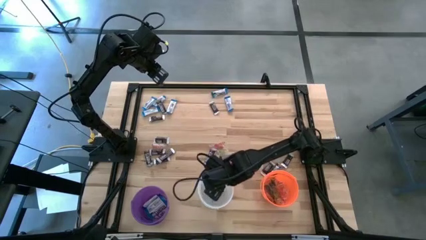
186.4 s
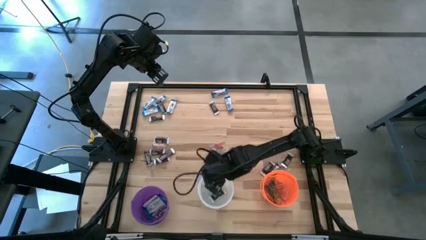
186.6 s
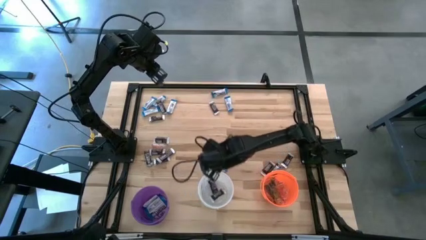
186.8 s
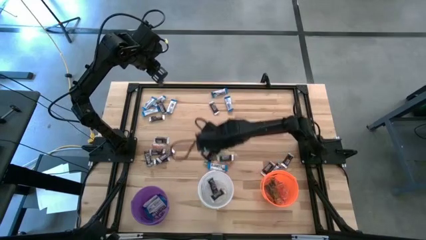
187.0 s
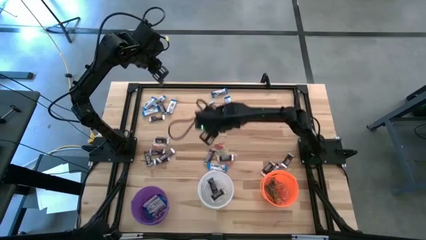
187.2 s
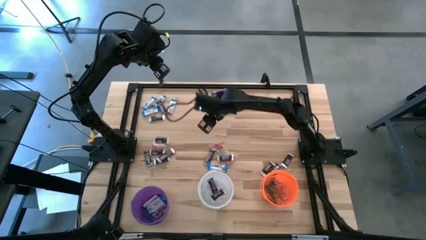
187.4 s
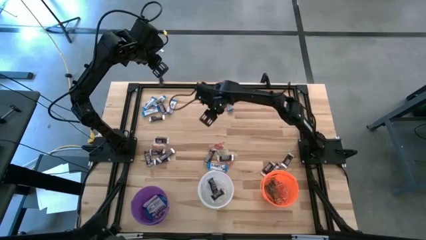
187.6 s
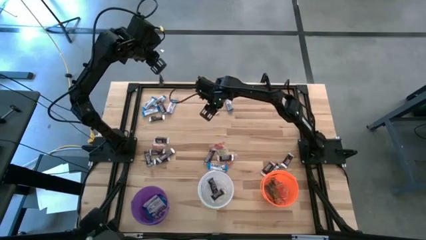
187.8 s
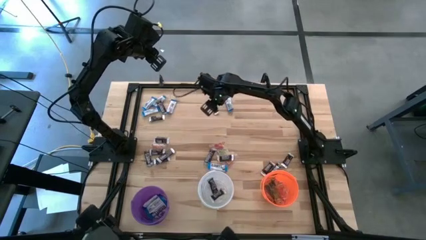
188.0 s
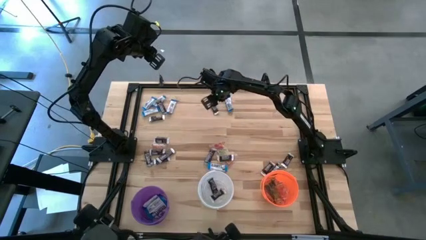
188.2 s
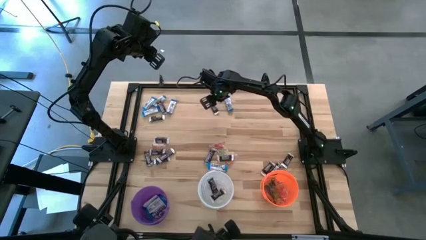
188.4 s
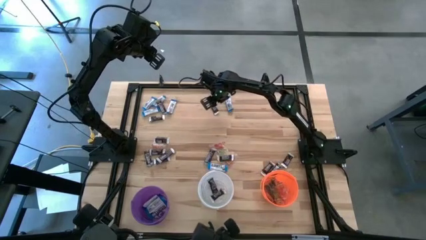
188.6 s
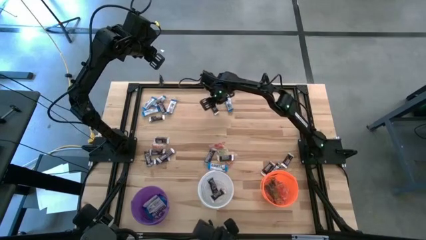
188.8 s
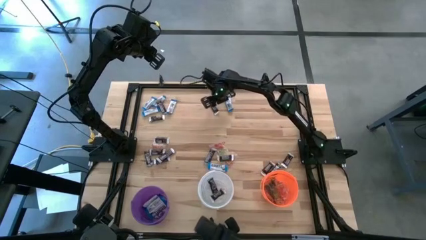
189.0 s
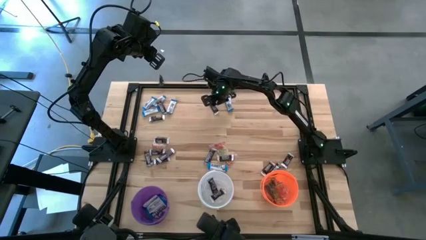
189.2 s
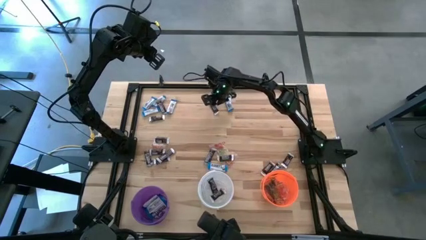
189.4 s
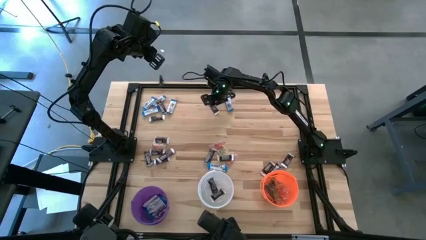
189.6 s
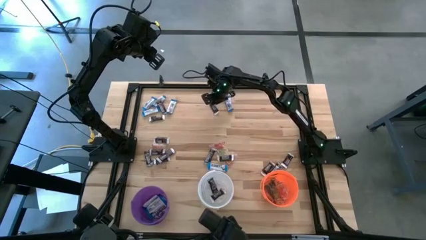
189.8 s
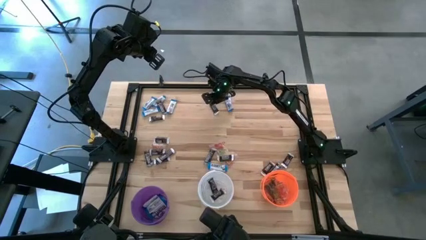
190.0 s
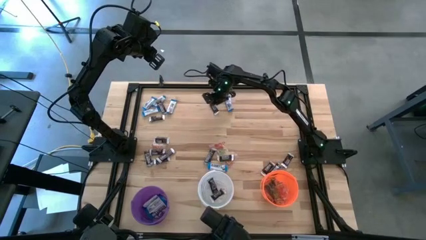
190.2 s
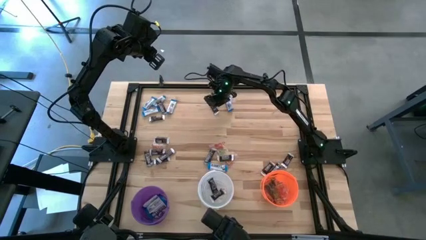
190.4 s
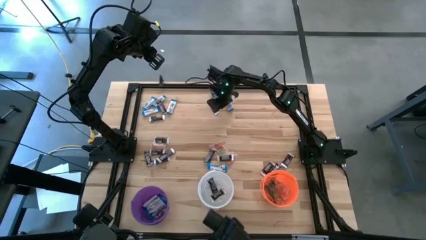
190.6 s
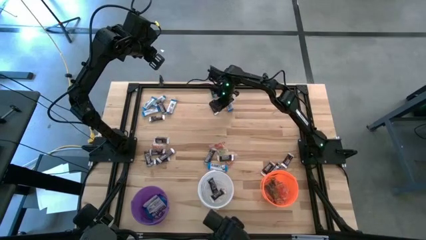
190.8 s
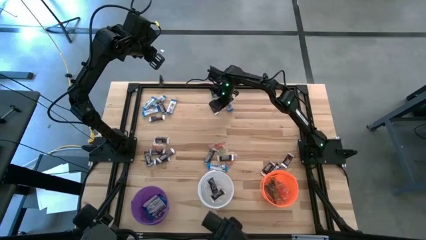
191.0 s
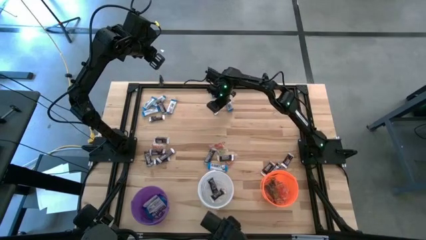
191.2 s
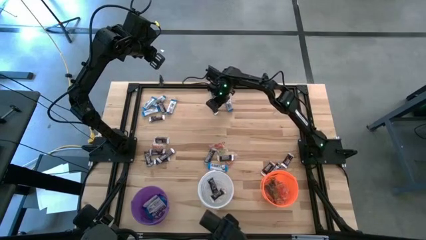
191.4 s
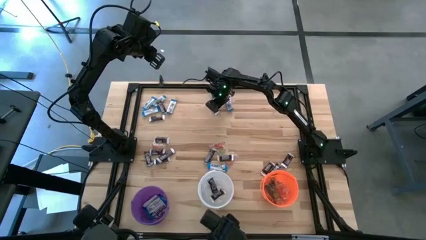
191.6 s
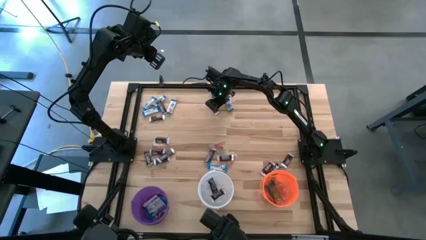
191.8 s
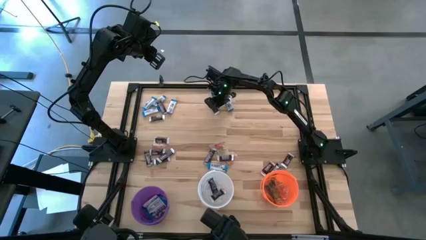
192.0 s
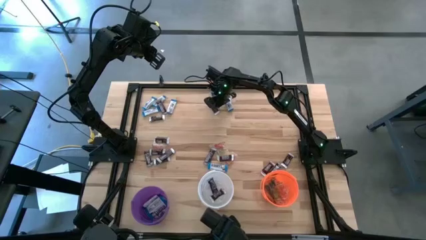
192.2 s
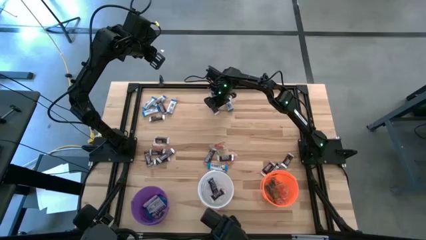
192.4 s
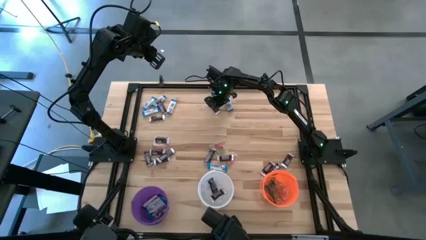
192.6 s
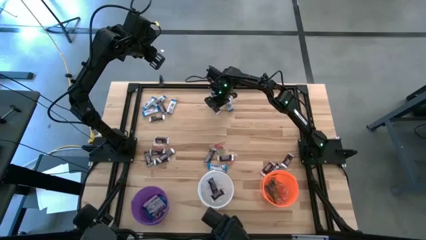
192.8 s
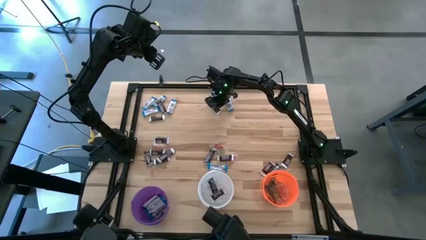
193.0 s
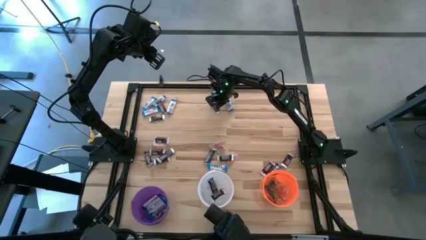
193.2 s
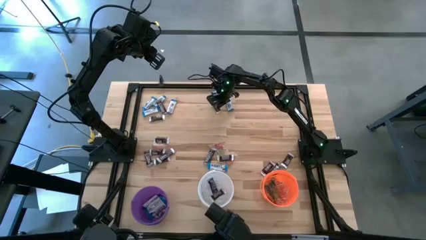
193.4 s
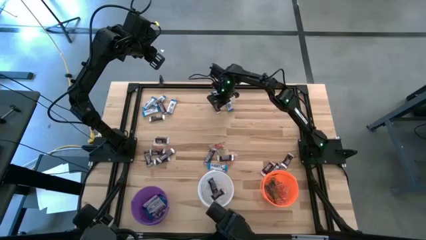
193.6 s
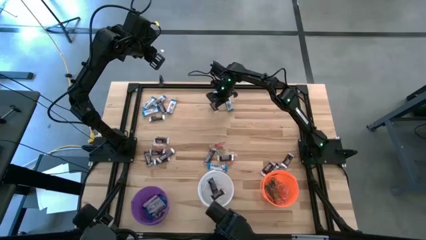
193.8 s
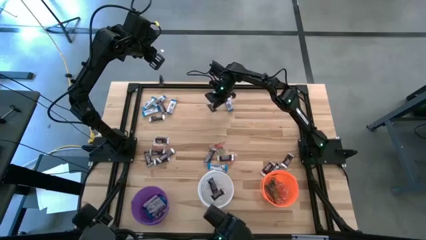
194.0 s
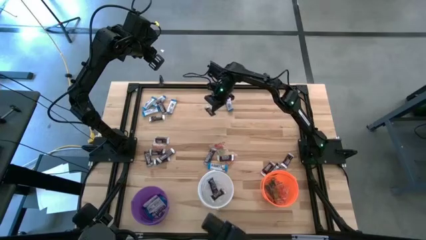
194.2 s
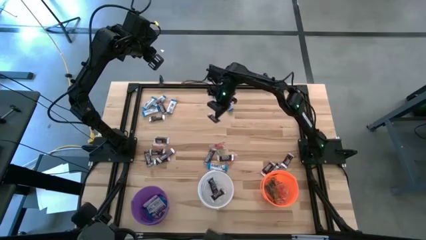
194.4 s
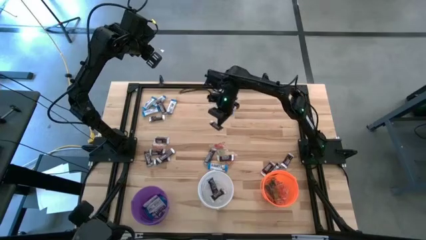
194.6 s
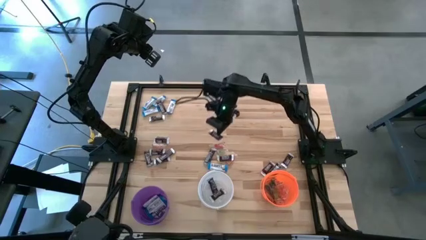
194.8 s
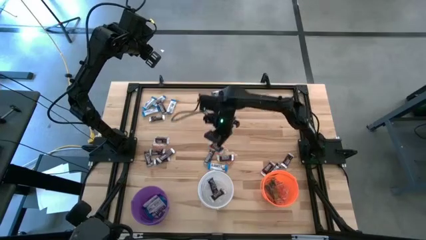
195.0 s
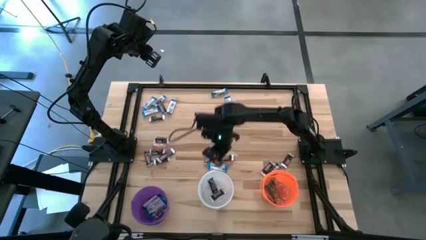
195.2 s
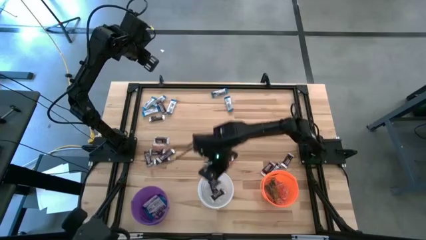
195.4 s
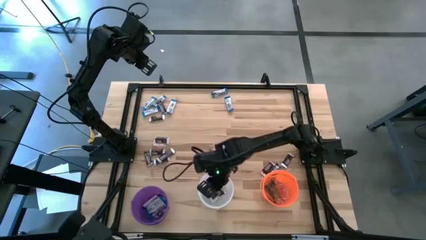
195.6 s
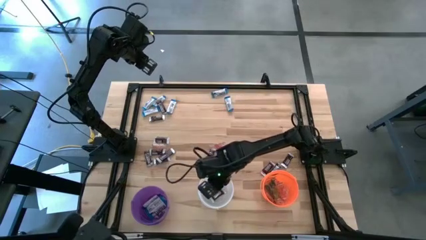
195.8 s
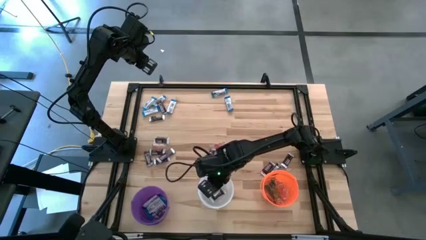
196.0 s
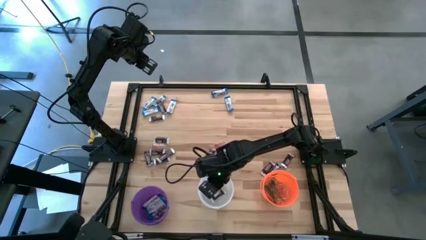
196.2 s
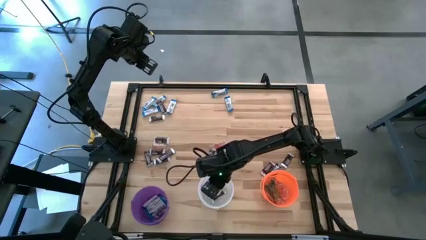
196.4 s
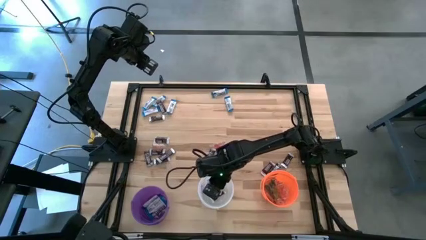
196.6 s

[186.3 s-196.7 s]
Task: Sort candy
Put the brown chocolate into the white bucket

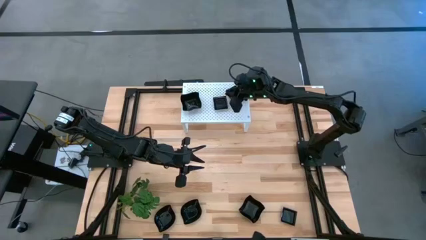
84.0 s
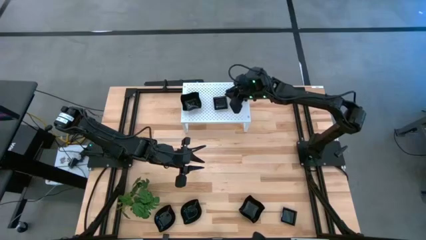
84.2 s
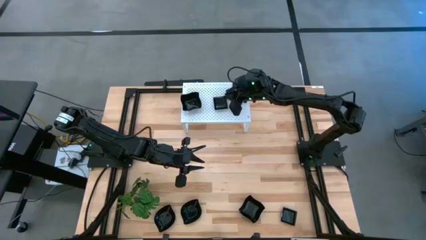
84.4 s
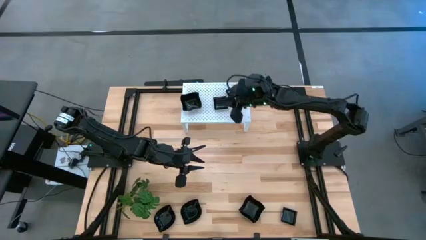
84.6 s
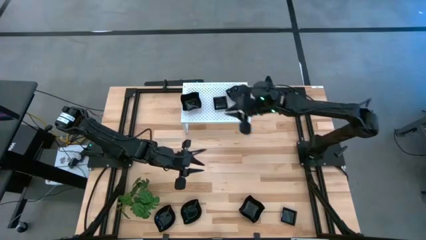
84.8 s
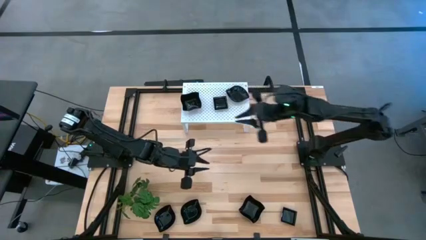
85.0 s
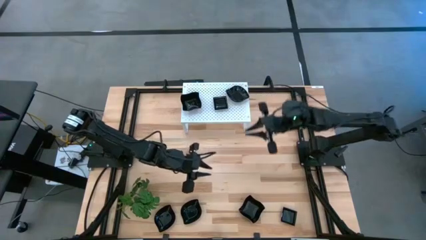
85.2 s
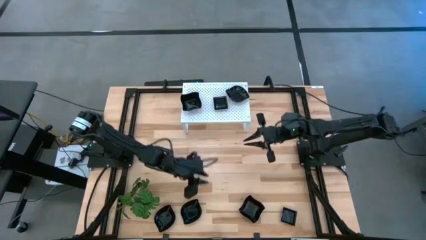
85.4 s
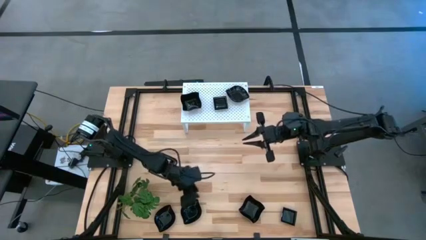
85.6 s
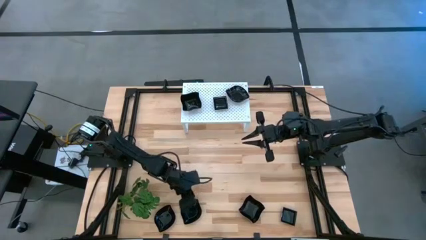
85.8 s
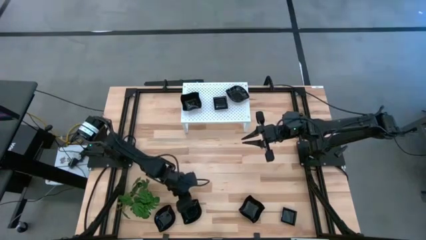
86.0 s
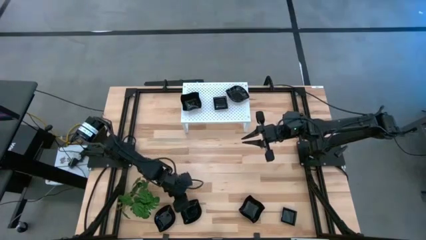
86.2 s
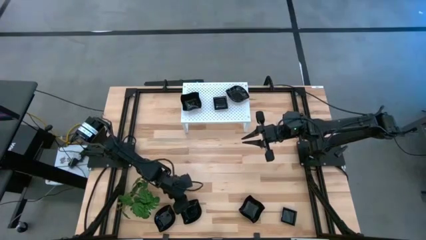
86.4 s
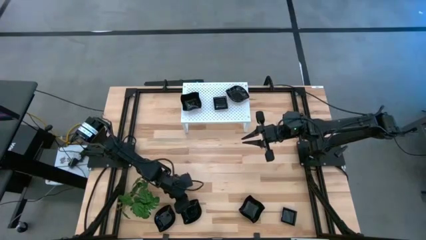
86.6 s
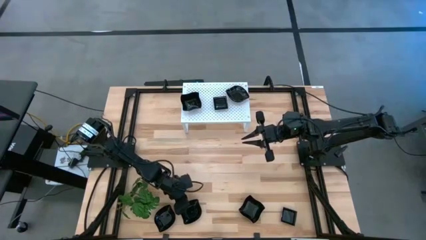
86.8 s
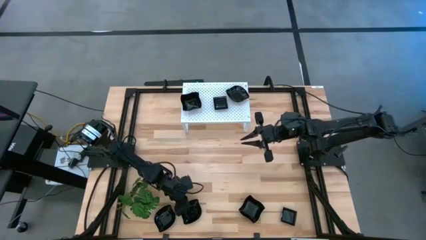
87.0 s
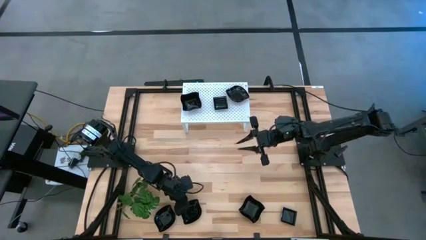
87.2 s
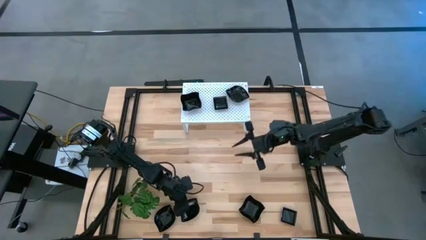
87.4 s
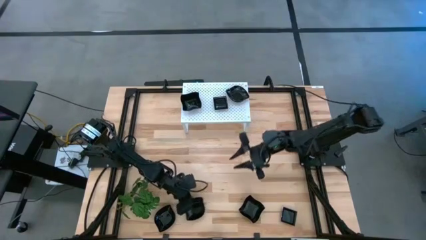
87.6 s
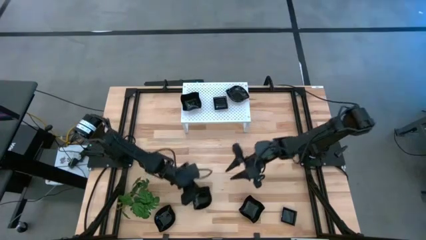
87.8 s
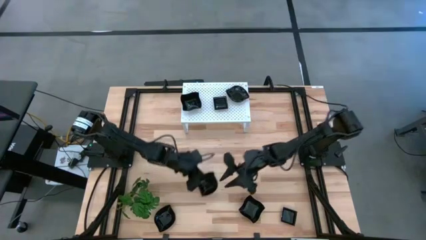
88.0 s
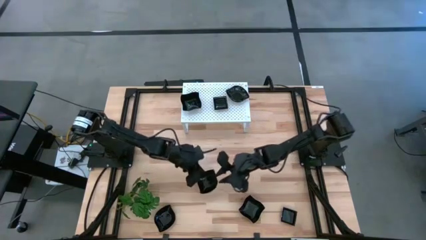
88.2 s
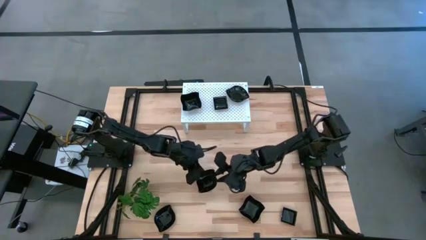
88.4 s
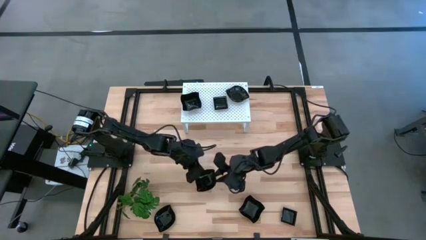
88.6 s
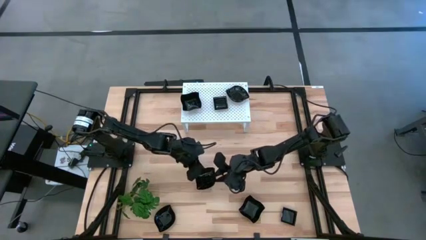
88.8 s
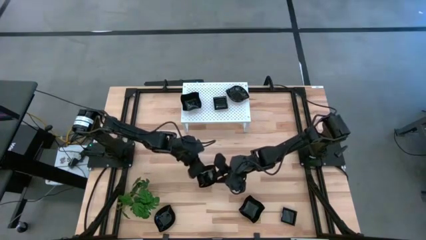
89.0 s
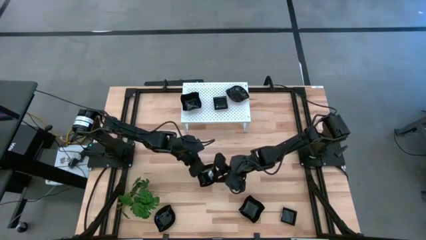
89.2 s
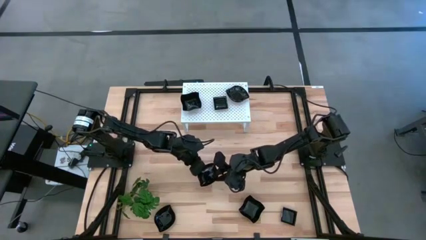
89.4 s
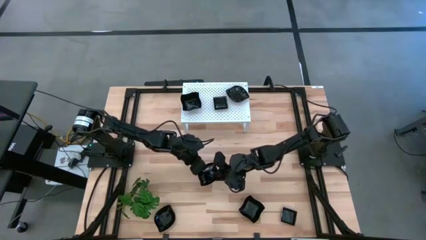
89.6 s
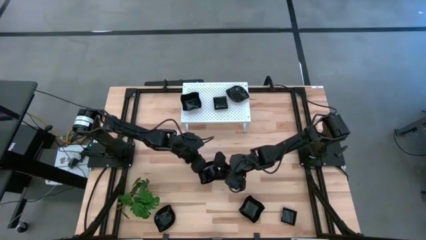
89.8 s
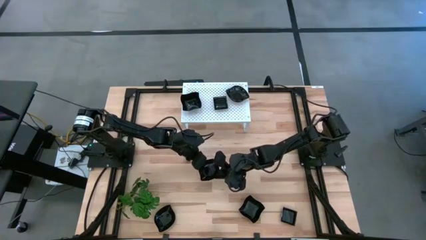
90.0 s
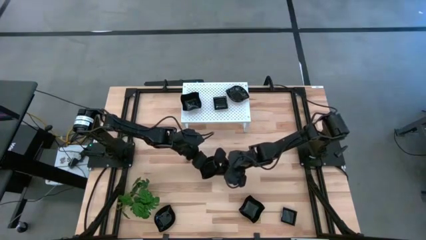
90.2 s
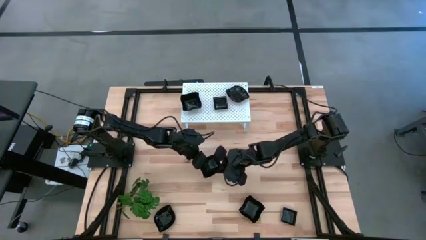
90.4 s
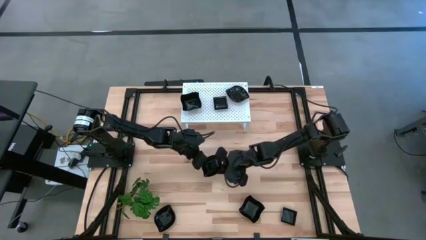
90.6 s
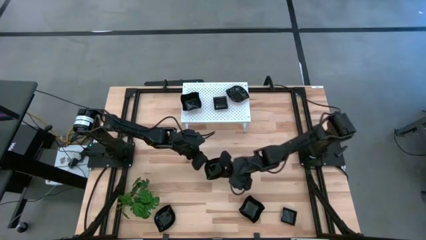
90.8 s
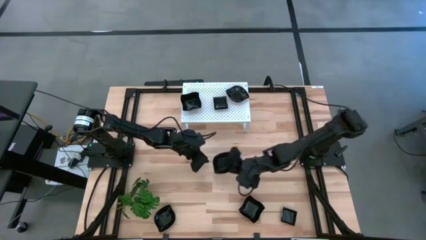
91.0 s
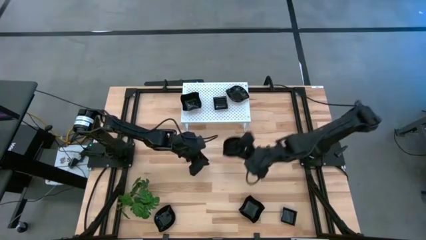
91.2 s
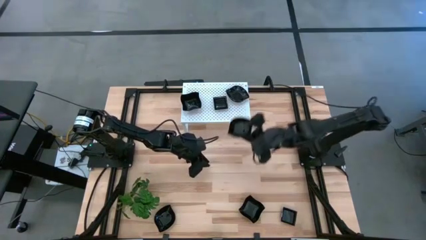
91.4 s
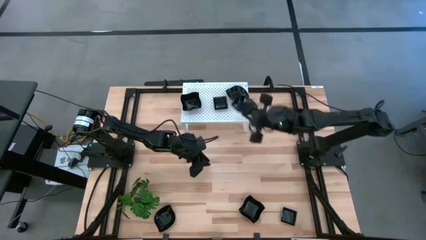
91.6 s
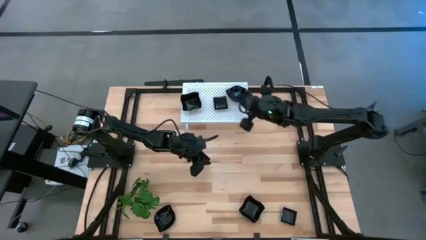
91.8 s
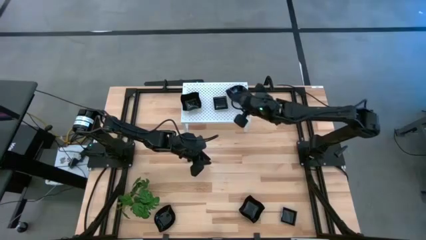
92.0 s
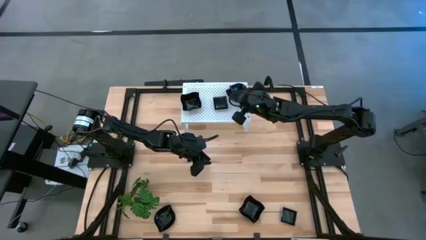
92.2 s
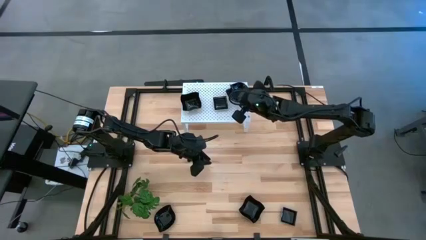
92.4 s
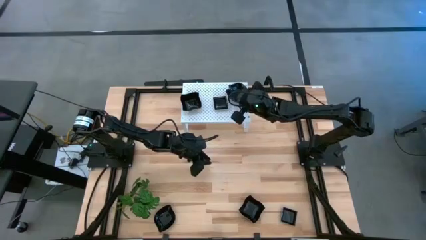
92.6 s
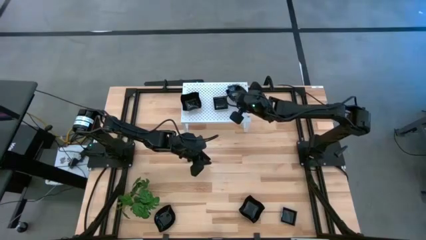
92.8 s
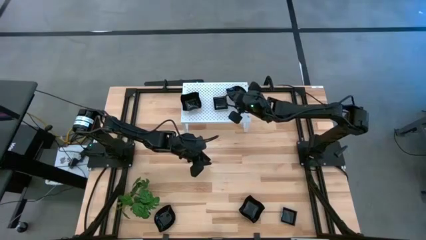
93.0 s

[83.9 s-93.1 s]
Task: Pick & Place Mini shaped plates
Stack the leaf shaped plate on top of the other leaf shaped plates on the shelf
